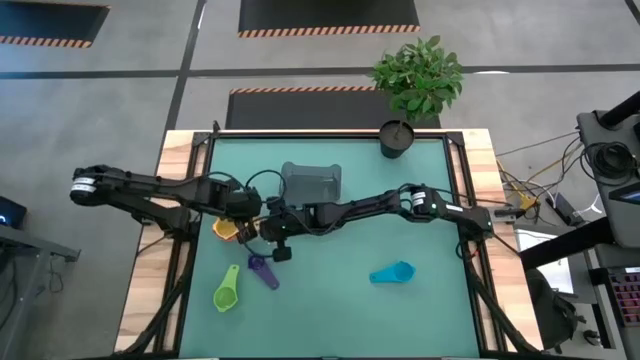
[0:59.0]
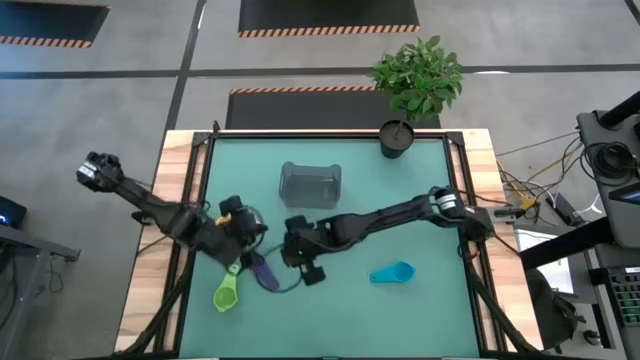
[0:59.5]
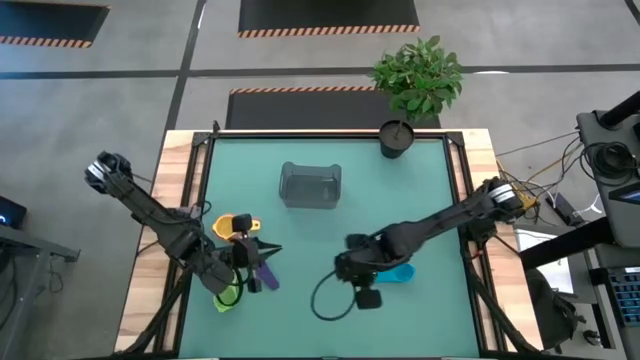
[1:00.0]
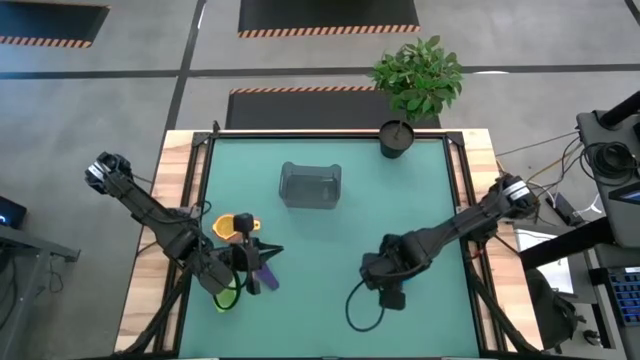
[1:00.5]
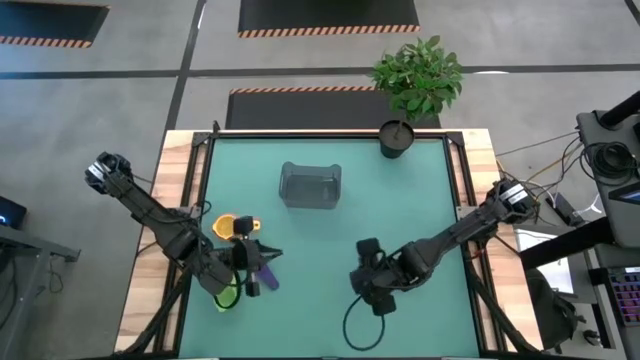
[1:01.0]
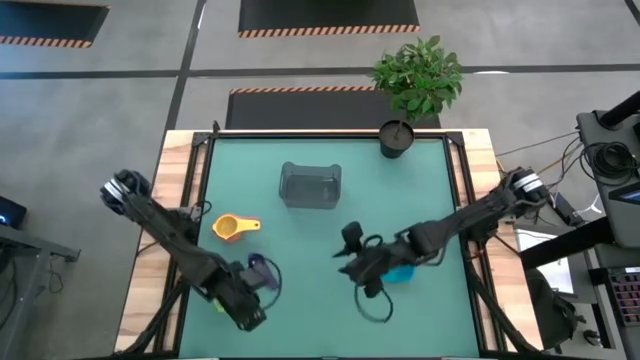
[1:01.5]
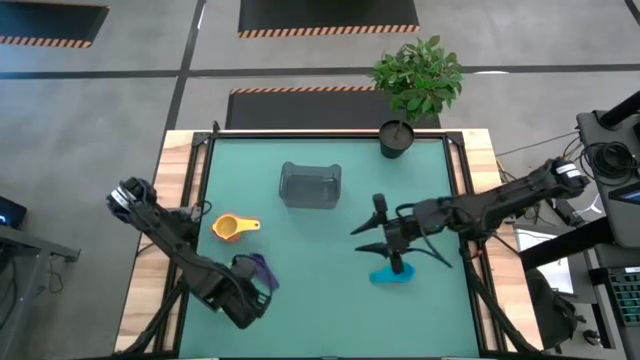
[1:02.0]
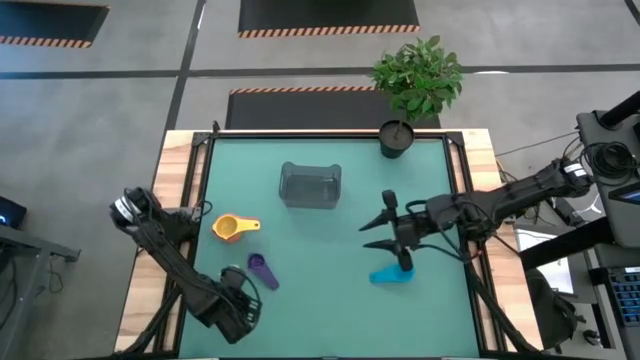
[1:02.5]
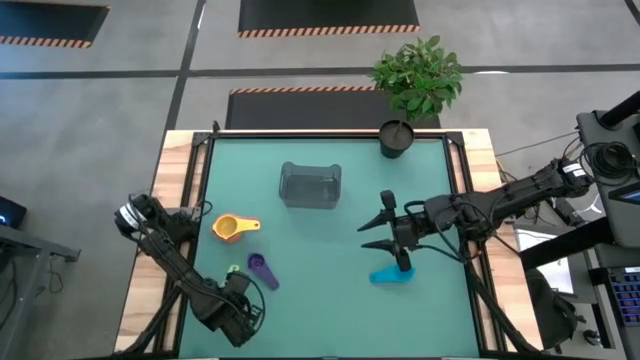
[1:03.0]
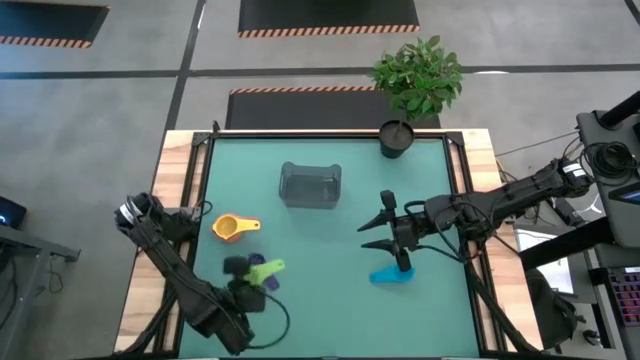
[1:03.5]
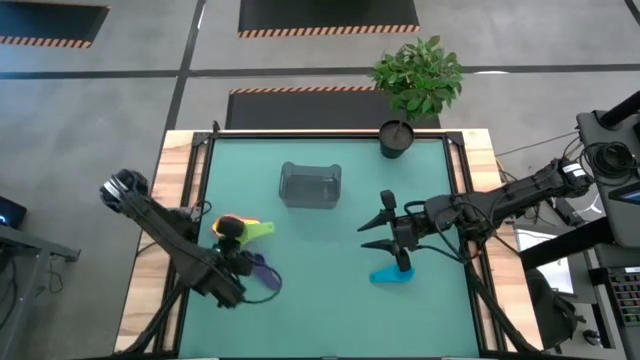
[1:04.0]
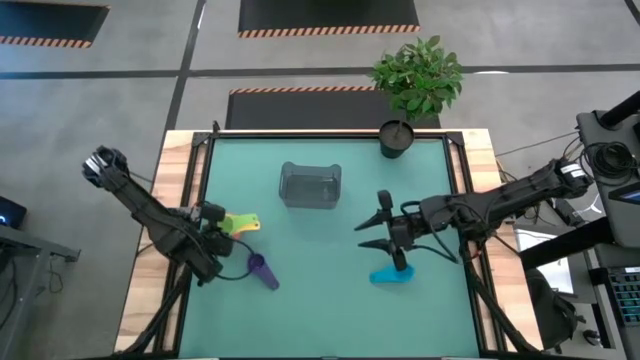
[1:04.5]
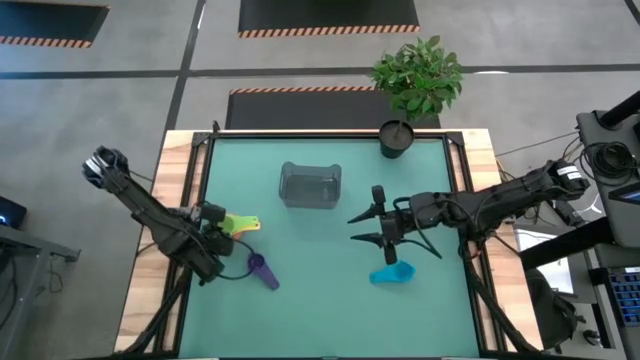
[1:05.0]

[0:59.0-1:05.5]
Task: Nest measuring cups in basket
Stack the green measuring cup into the yellow measuring cup

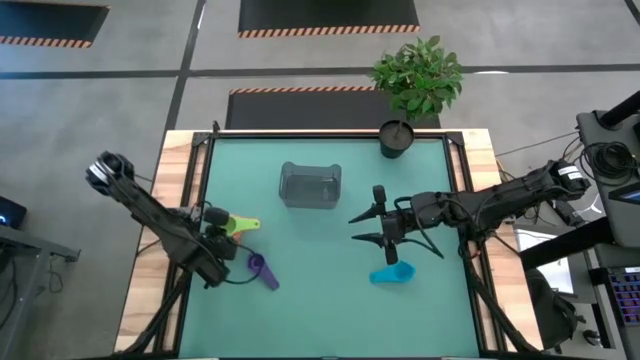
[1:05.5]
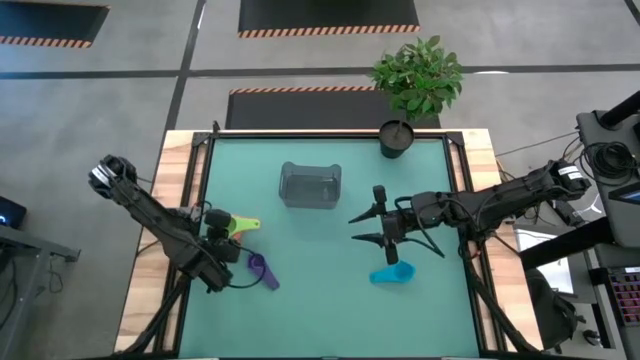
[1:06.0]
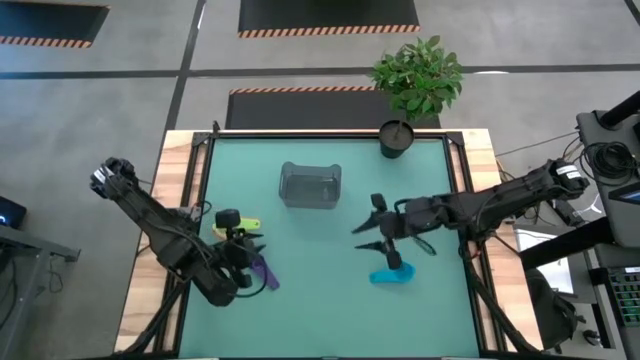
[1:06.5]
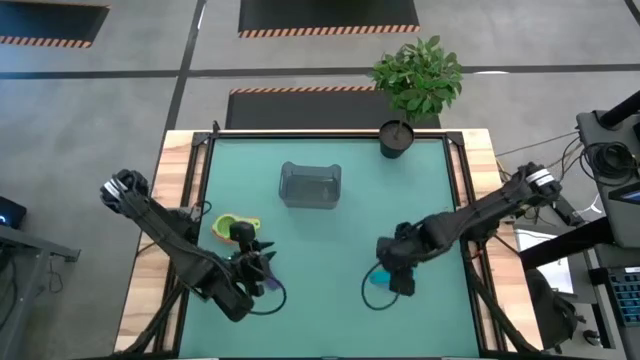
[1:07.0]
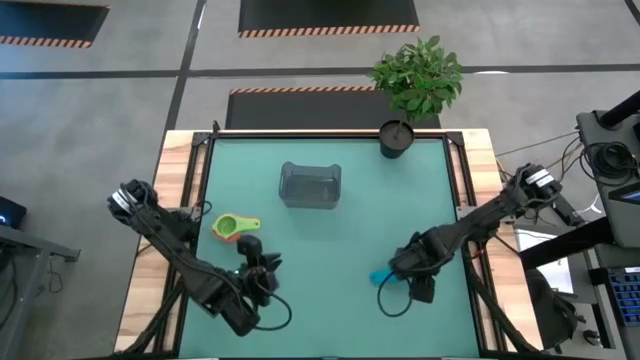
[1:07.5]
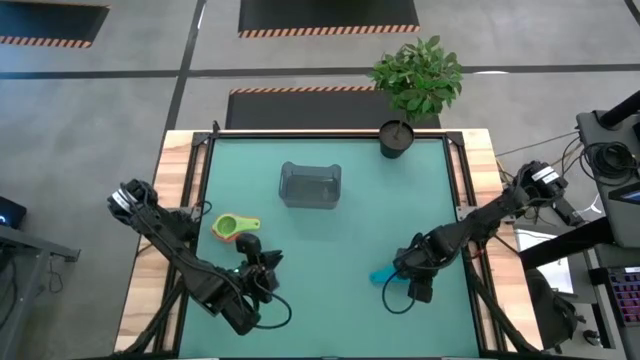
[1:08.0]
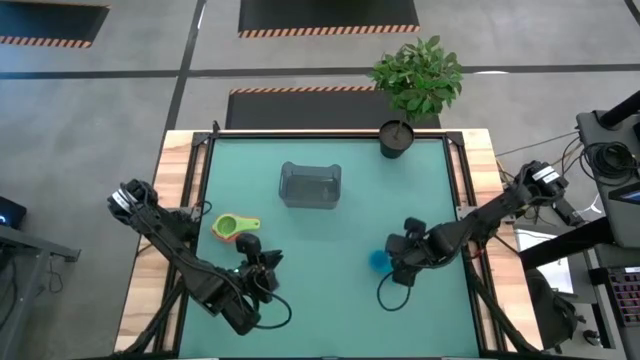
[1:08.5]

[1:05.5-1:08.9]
Stack the blue measuring cup into the yellow measuring cup

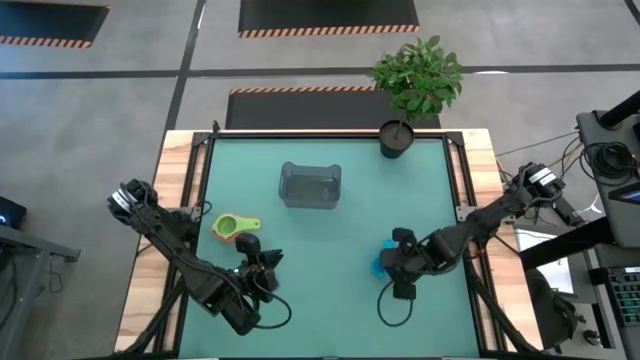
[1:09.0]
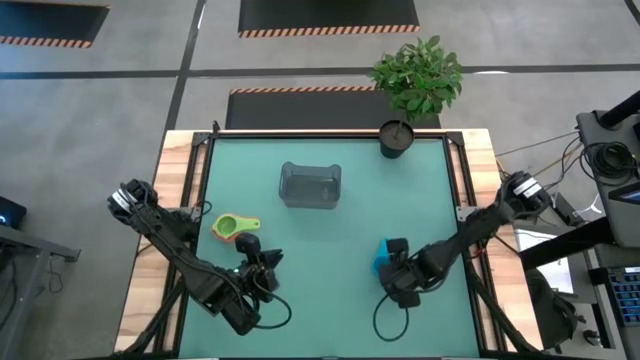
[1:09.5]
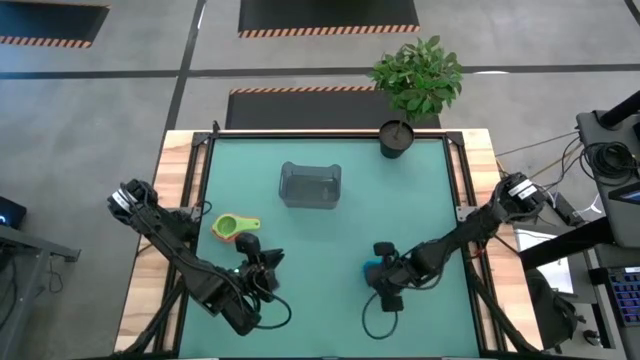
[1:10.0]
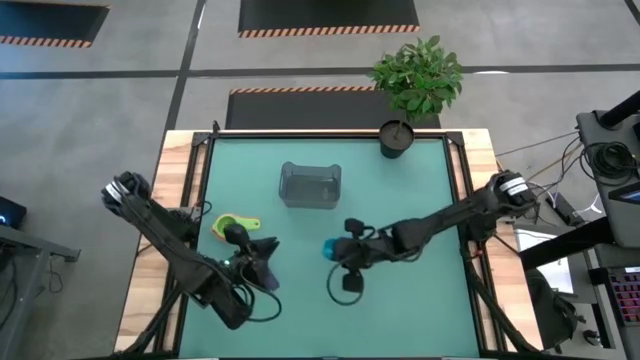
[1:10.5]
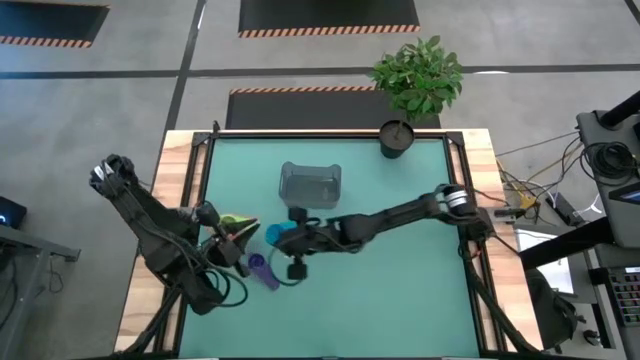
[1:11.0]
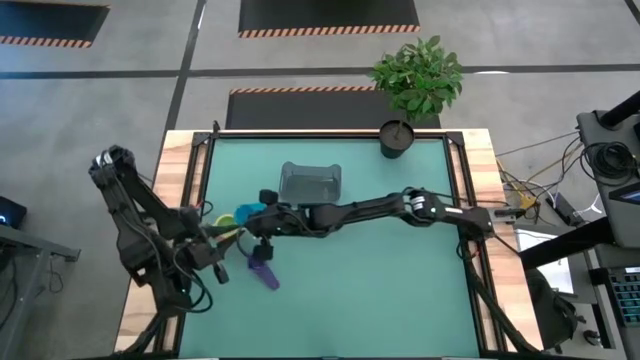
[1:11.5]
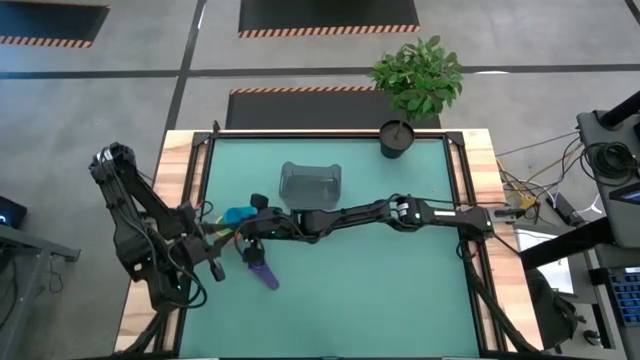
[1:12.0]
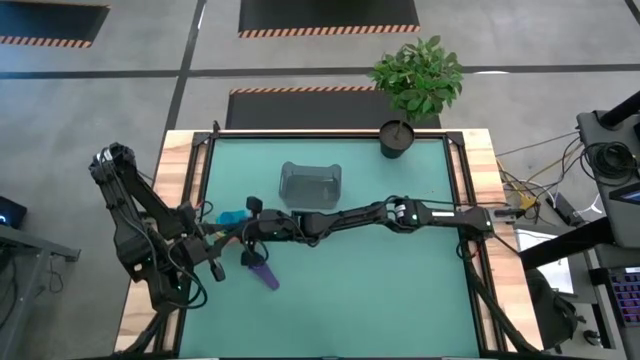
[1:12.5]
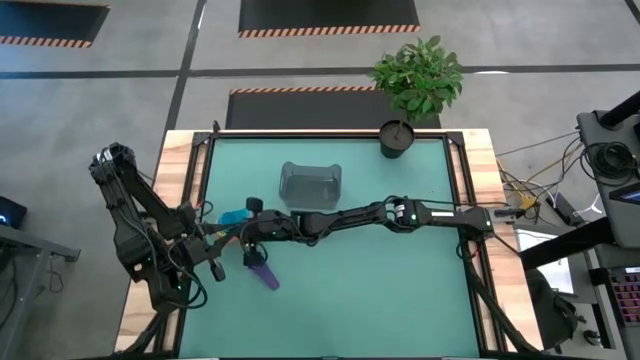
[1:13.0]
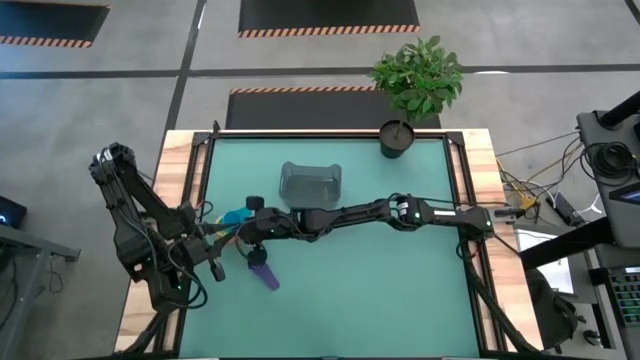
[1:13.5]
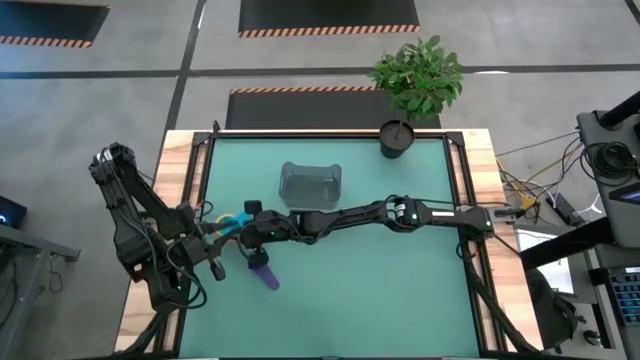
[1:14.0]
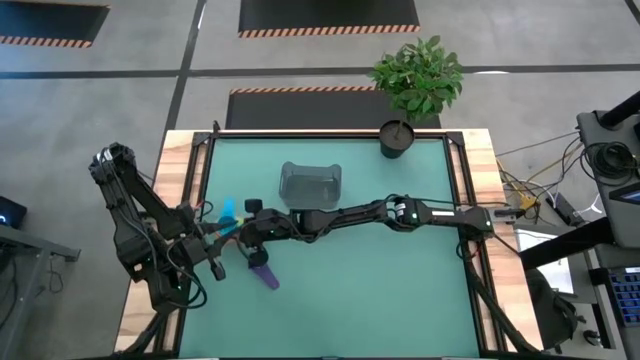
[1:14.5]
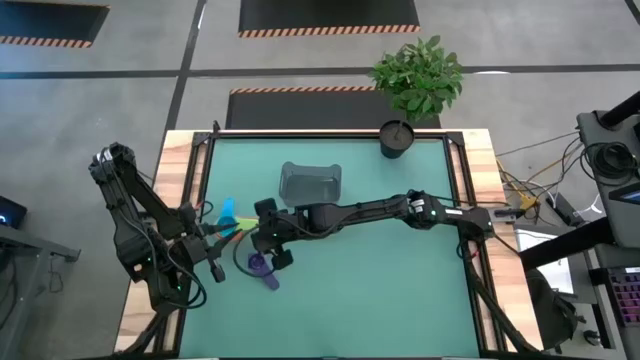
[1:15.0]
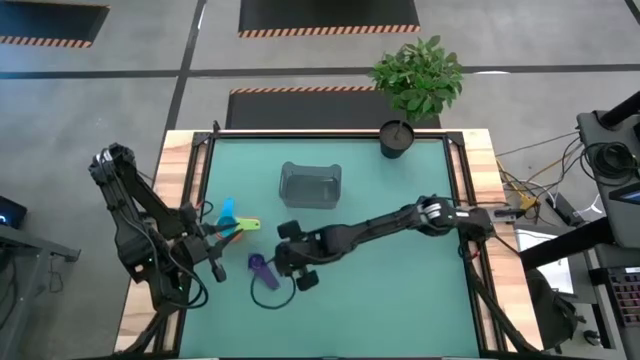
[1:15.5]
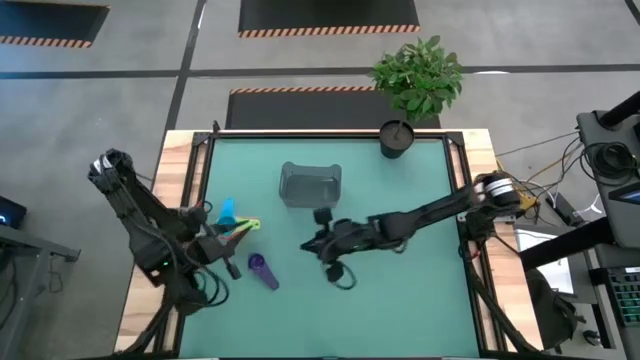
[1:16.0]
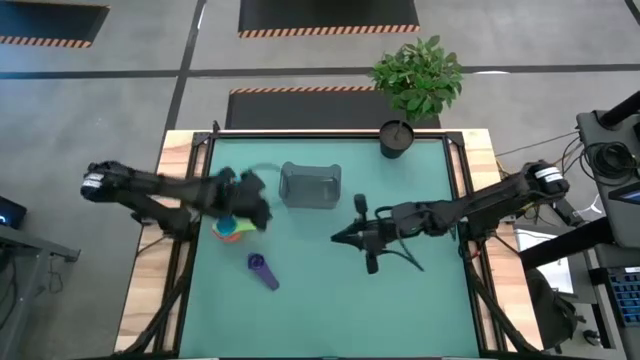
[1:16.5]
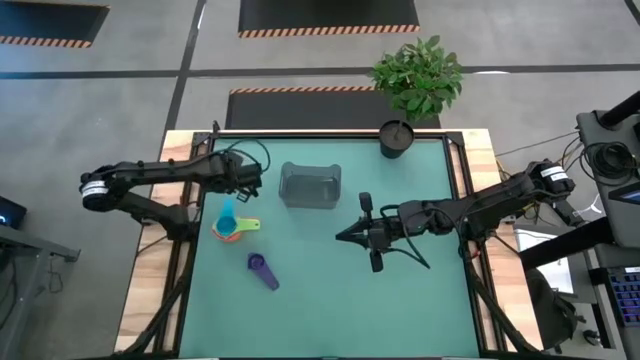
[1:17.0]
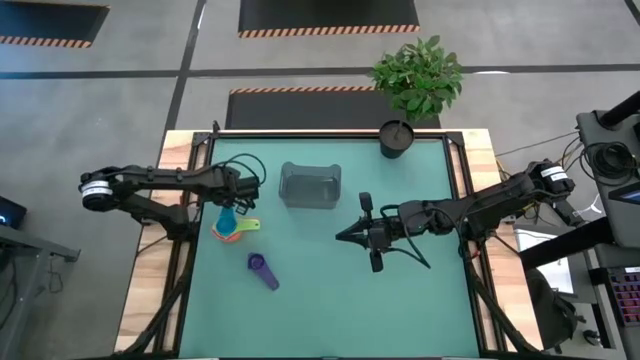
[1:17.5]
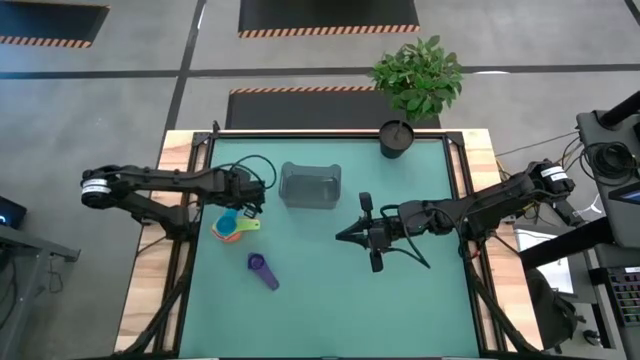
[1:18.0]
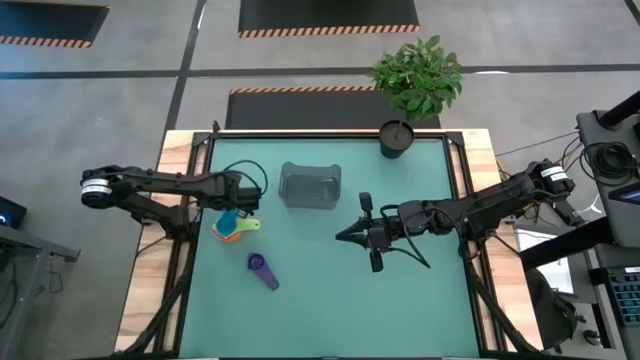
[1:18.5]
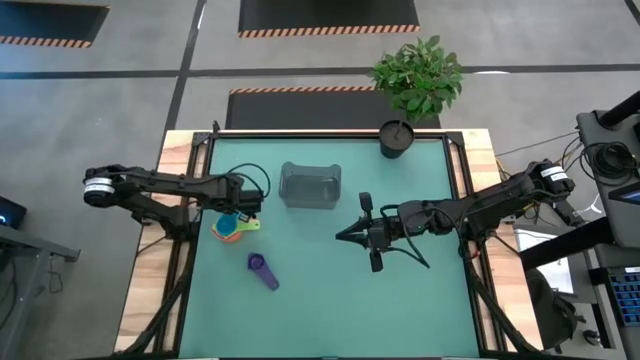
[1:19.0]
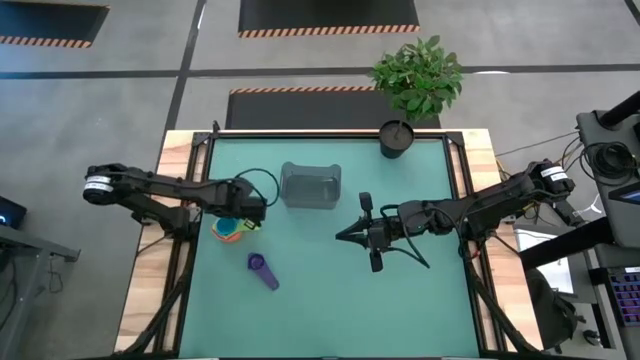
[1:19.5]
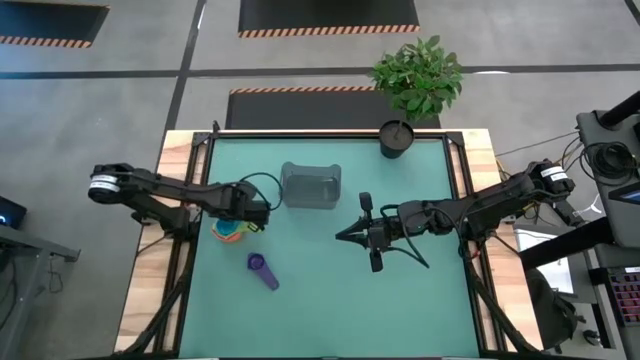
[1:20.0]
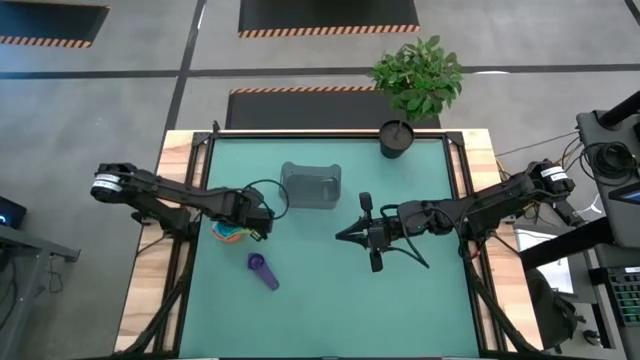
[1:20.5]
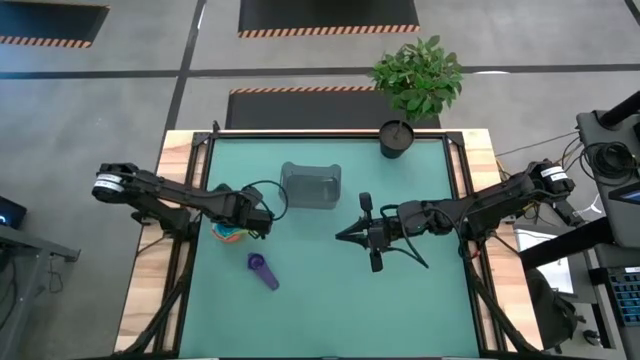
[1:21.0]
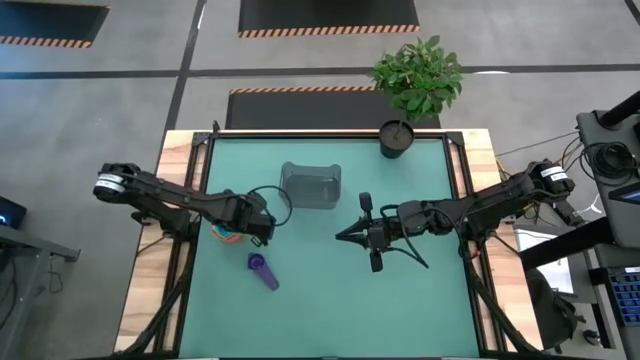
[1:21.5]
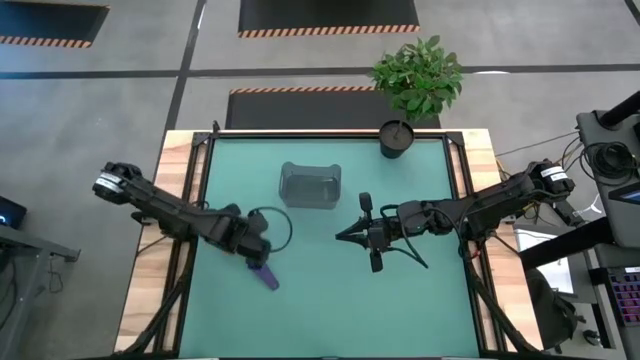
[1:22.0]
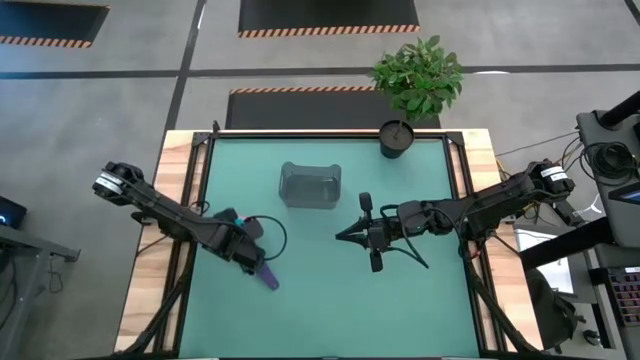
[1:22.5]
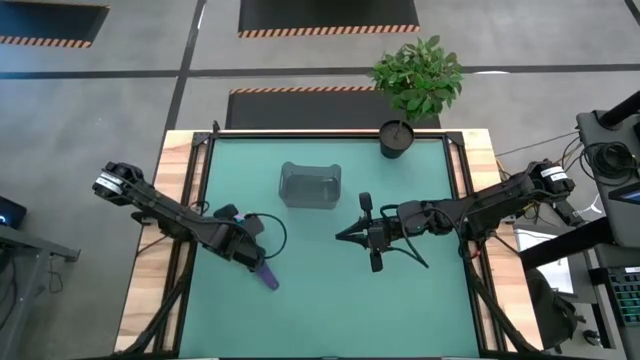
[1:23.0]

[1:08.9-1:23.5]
Stack the blue measuring cup into the yellow measuring cup
